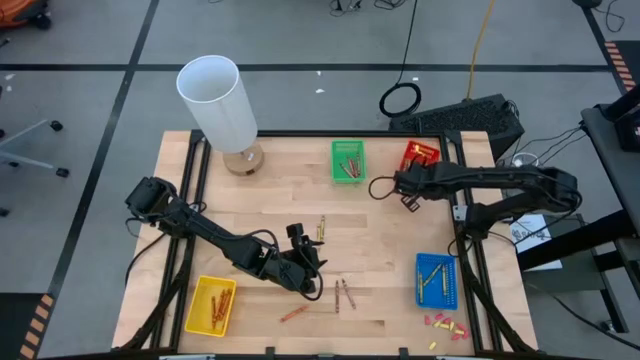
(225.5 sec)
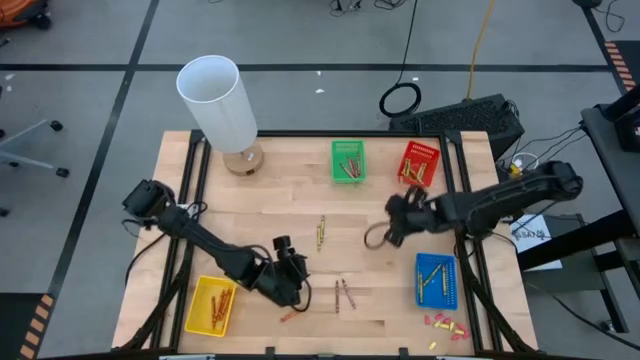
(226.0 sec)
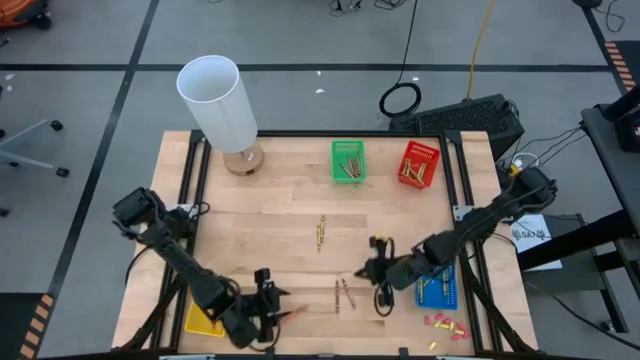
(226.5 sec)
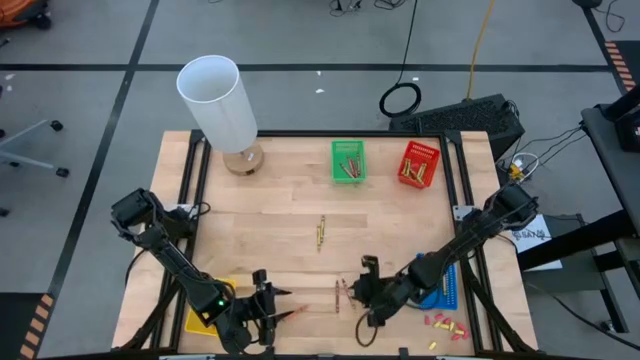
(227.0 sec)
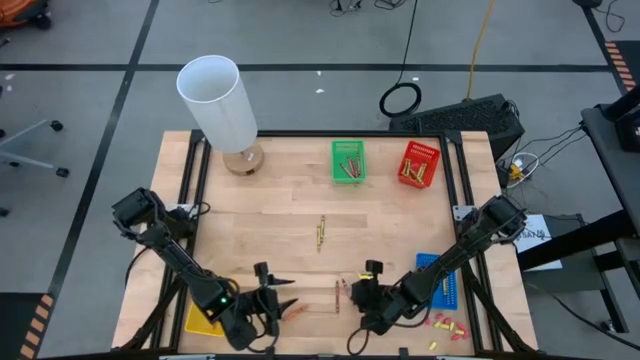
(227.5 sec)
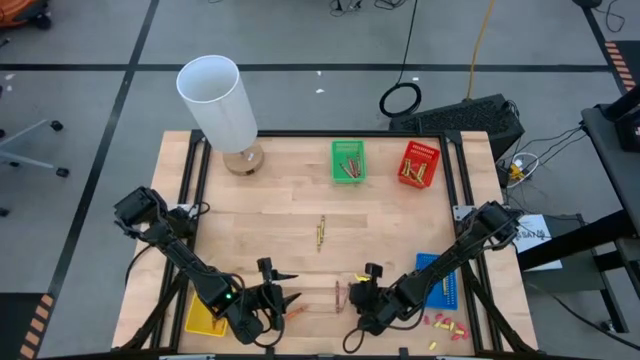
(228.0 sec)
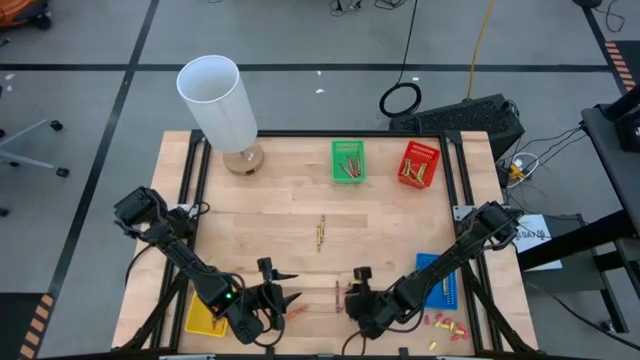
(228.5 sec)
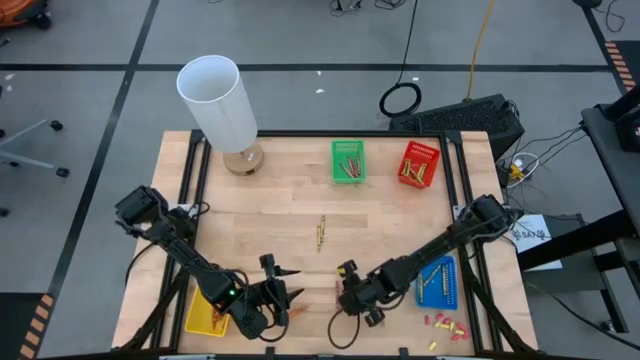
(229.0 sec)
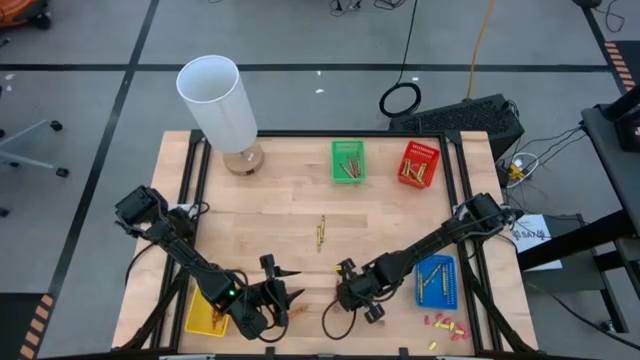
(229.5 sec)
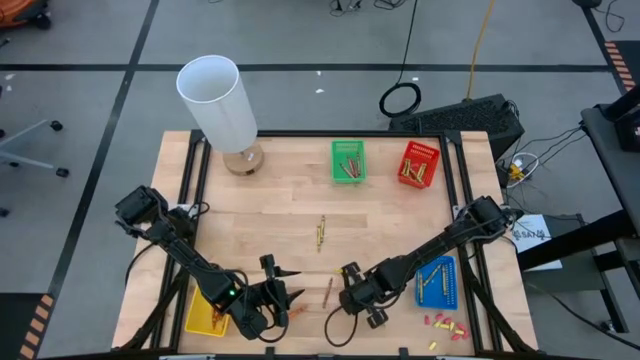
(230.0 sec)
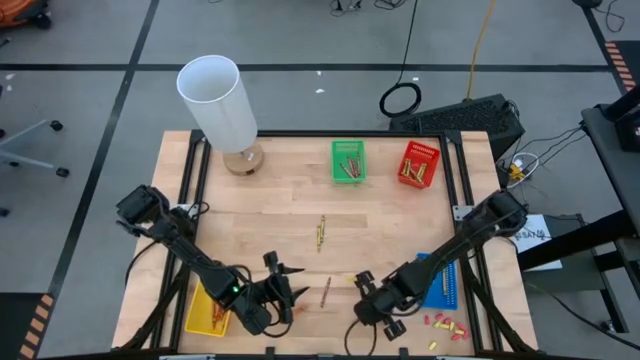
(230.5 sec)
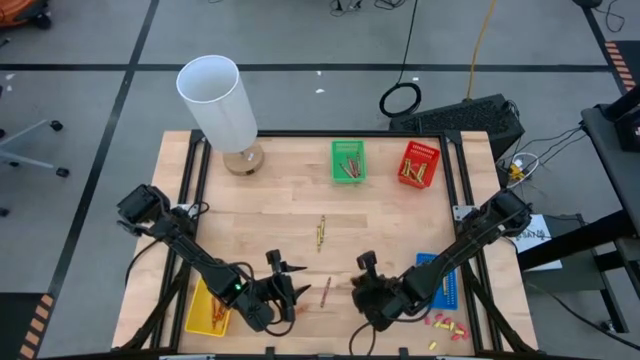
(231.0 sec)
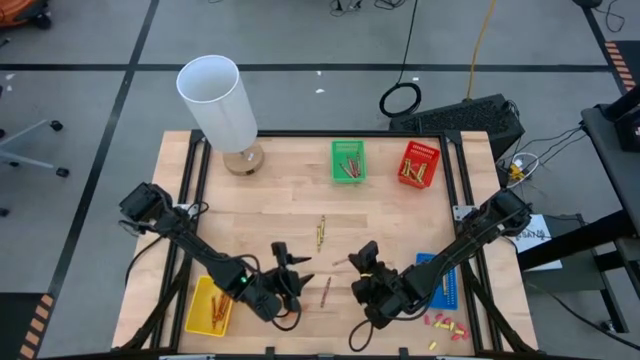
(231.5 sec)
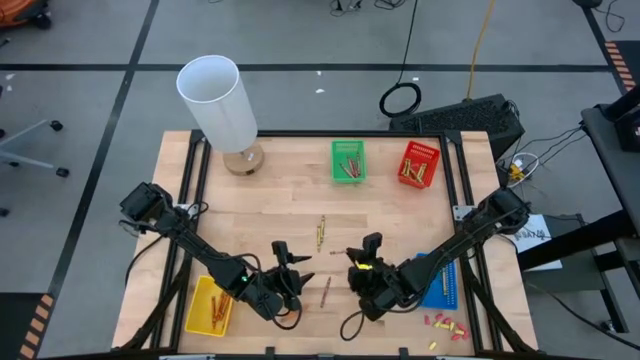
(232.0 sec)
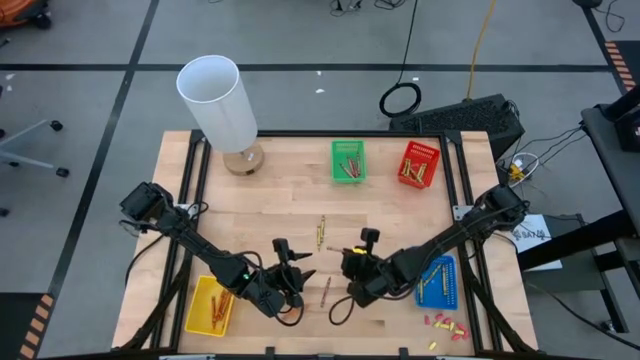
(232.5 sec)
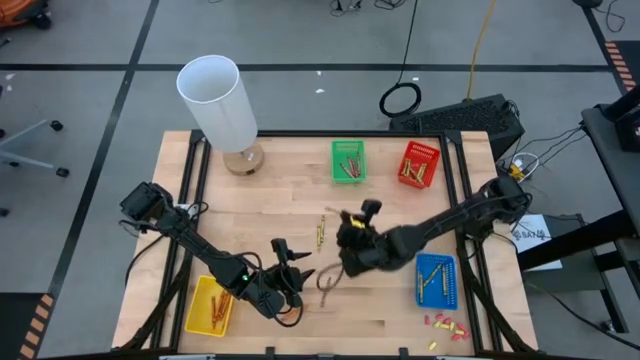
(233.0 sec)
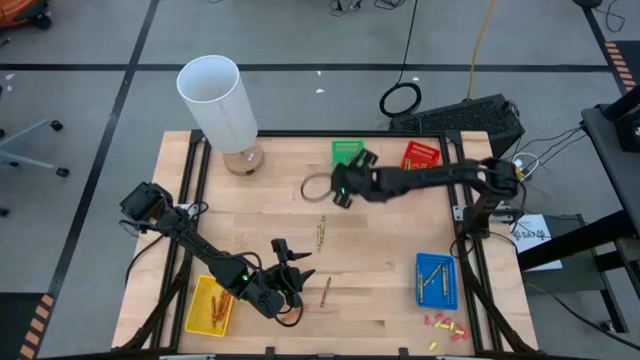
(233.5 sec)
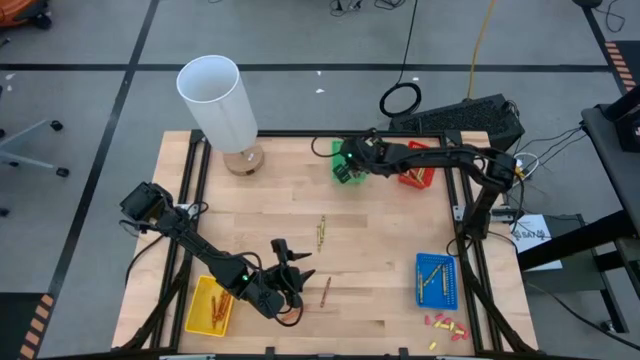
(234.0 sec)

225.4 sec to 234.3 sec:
Task: Sort crayons
Put the red crayon into the green bin

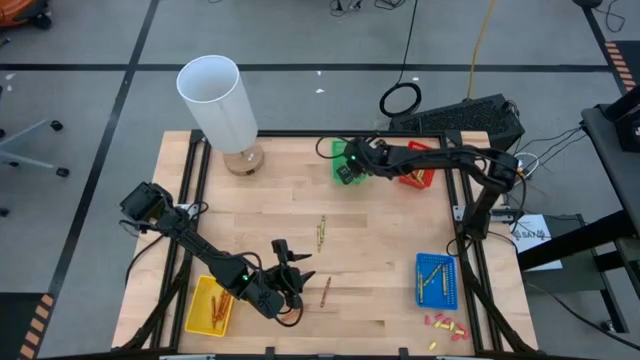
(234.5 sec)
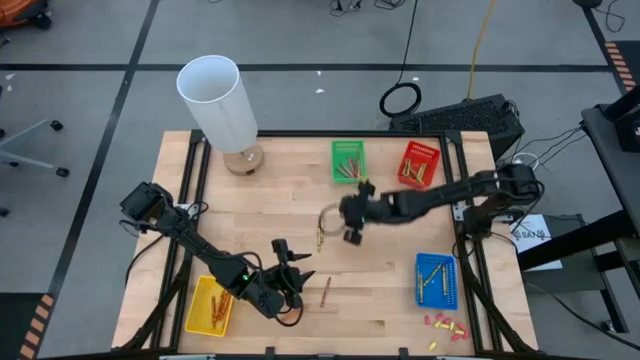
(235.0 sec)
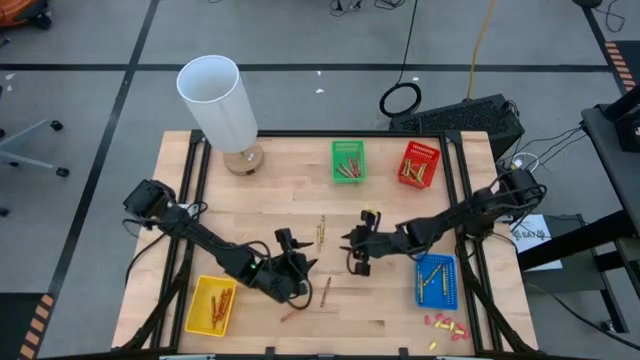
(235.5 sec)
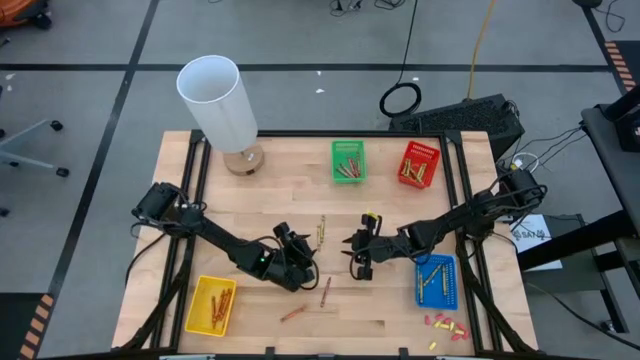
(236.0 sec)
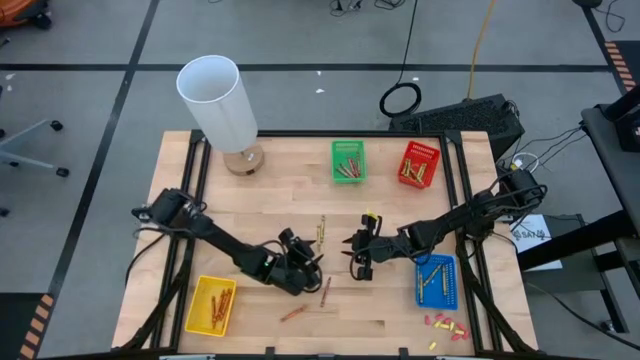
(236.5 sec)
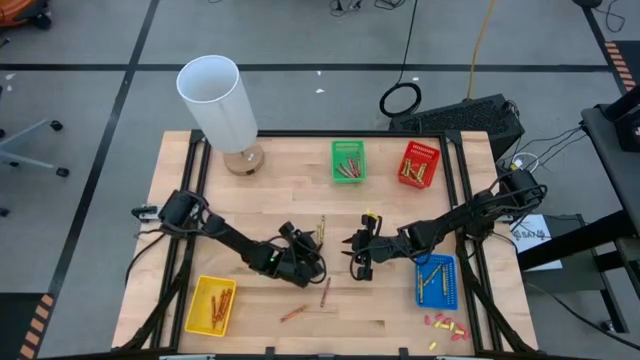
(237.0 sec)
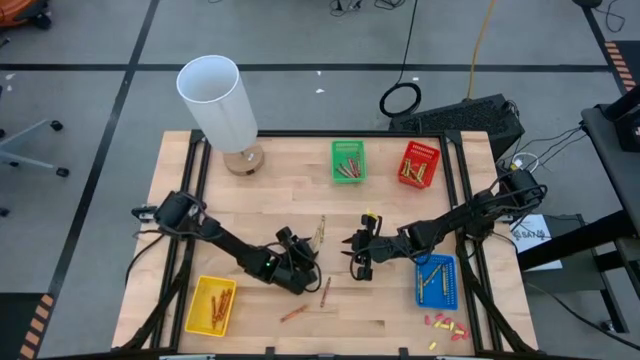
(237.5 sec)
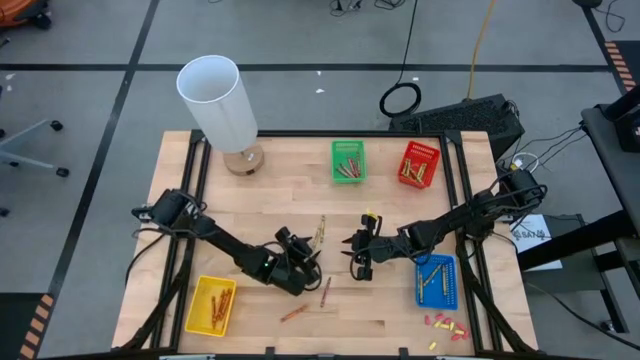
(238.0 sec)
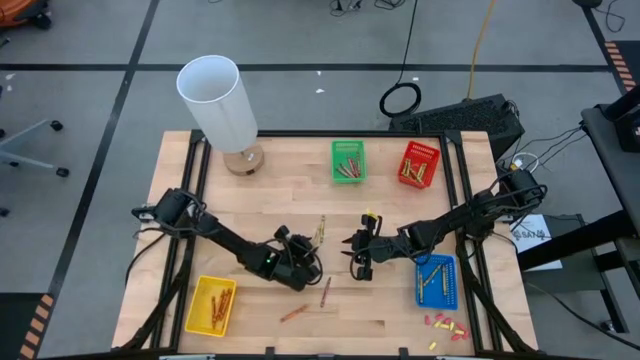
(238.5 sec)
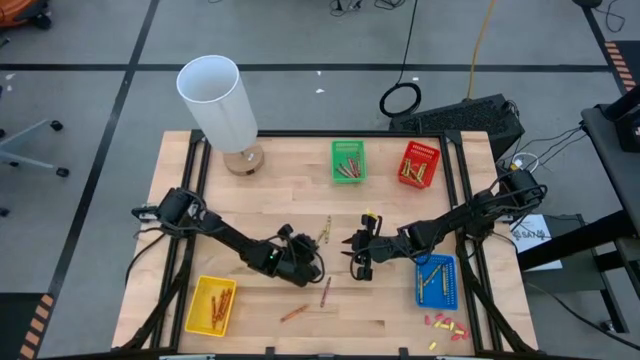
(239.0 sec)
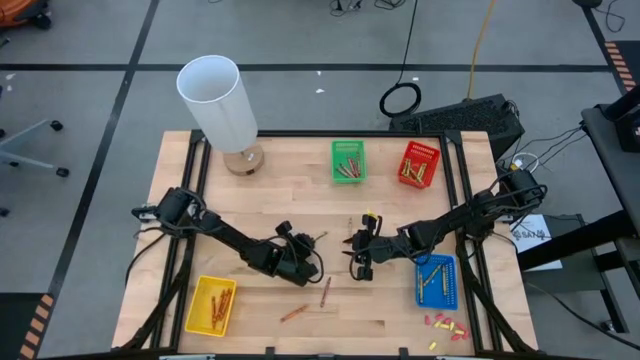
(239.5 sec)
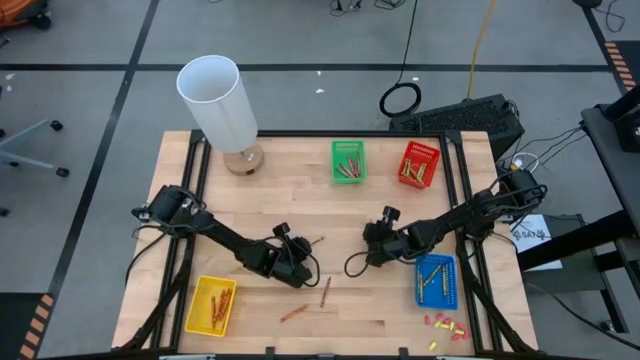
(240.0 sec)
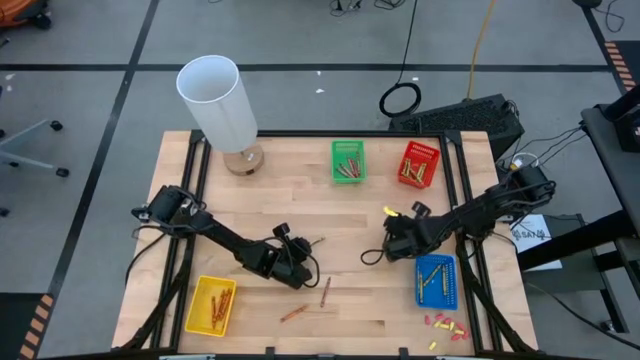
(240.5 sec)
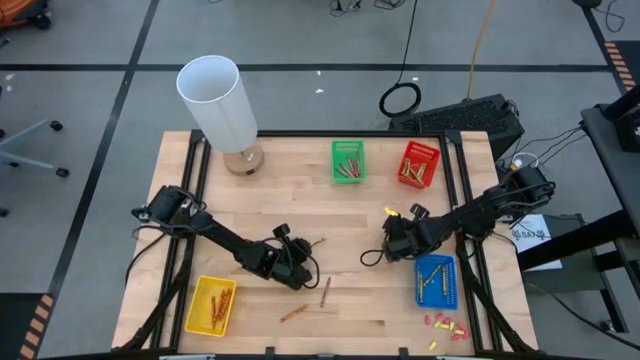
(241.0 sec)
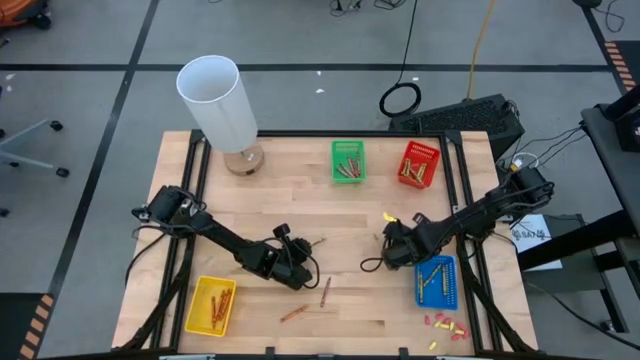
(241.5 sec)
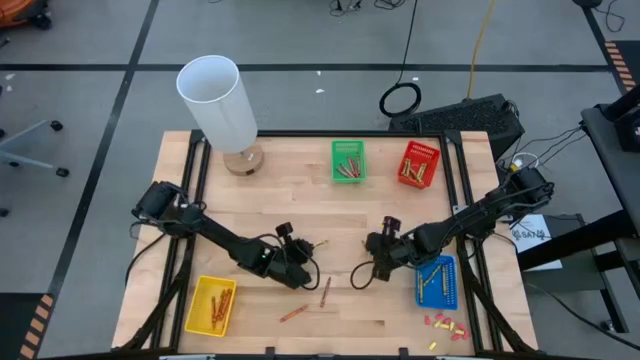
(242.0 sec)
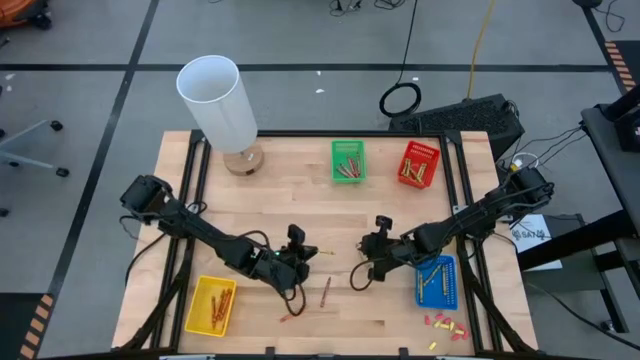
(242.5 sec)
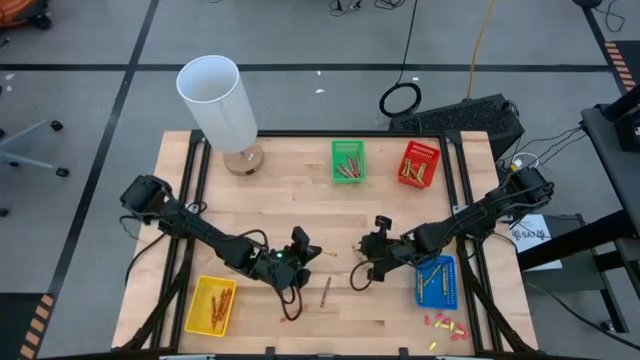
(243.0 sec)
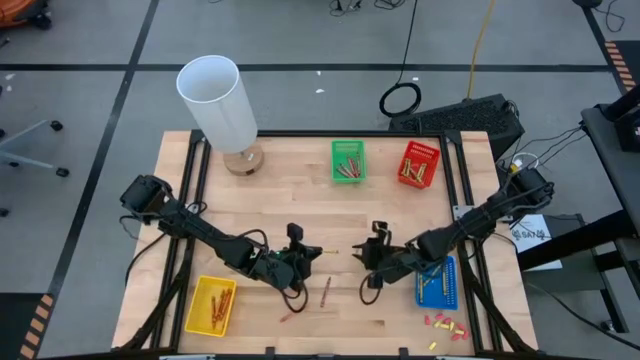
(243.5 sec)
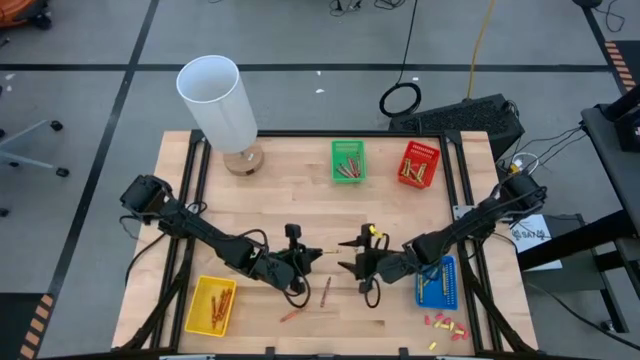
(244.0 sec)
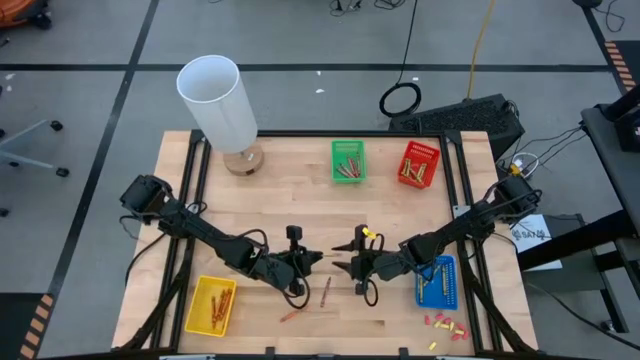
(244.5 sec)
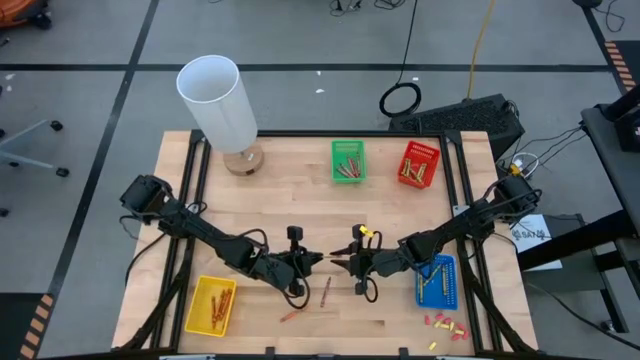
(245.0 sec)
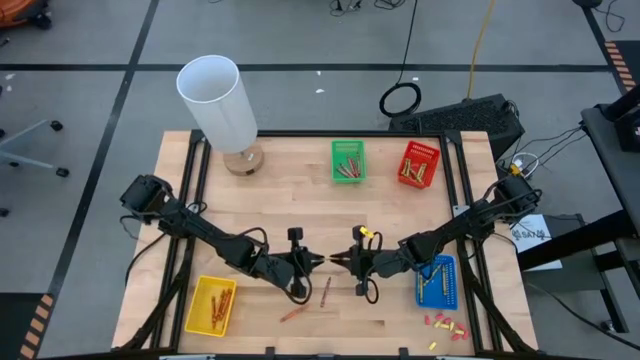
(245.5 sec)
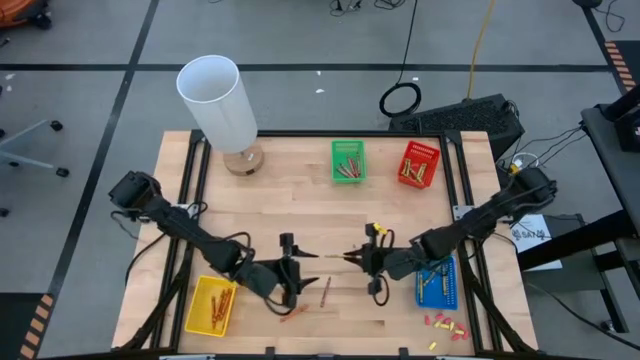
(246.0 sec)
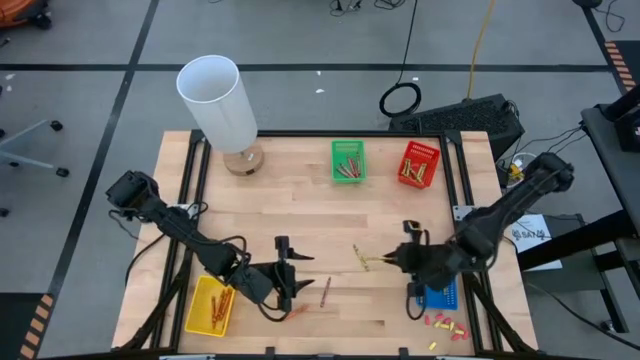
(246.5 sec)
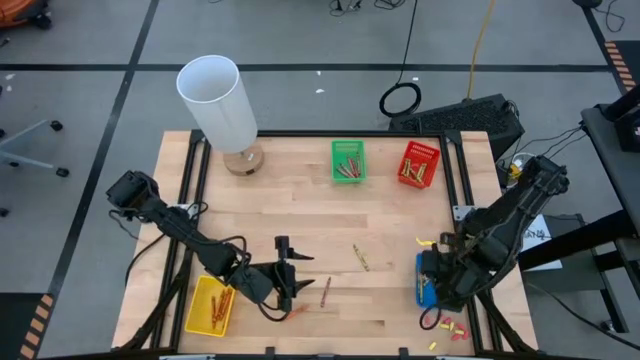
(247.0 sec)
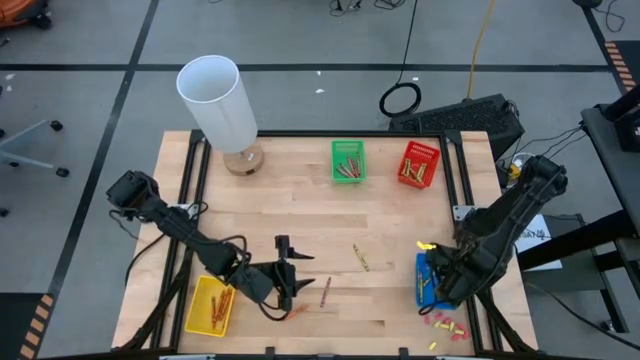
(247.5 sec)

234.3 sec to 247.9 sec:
Put the yellow crayon into the blue bin
